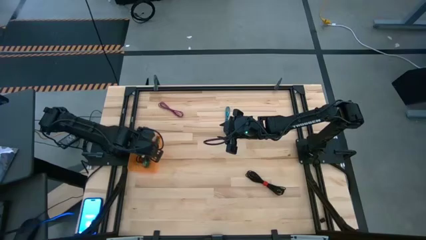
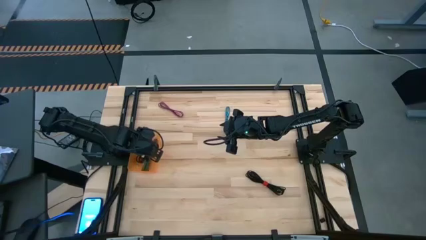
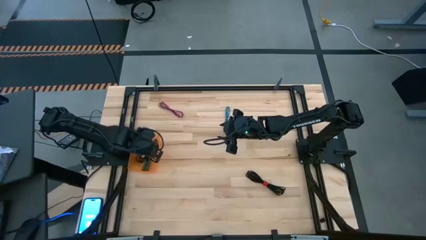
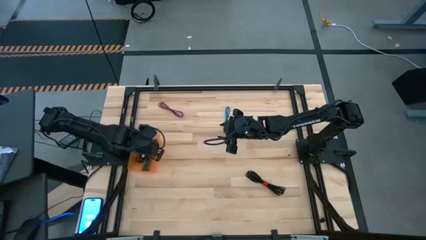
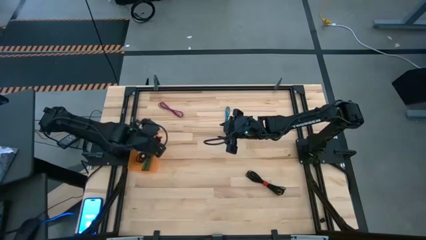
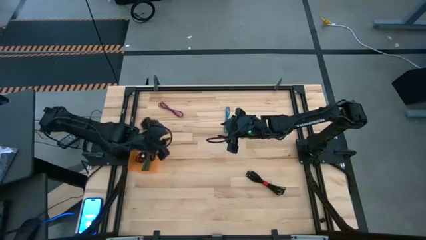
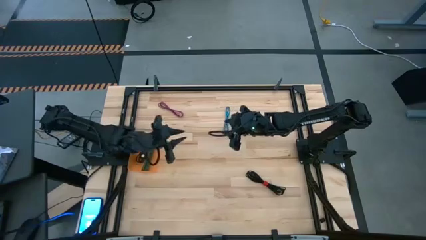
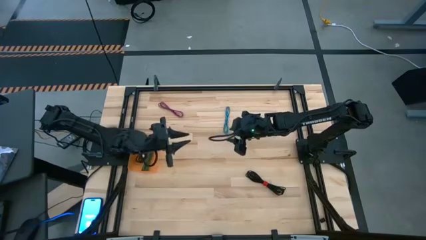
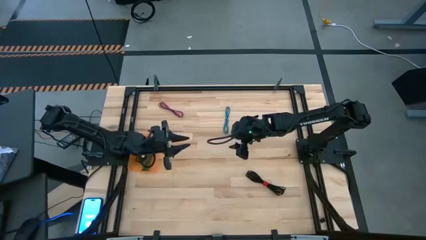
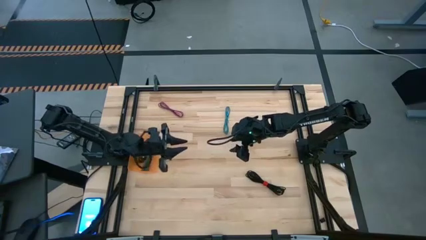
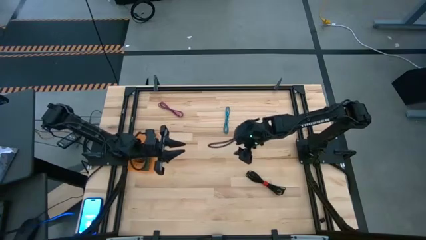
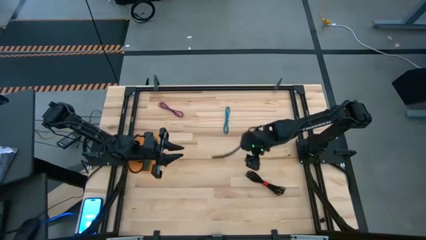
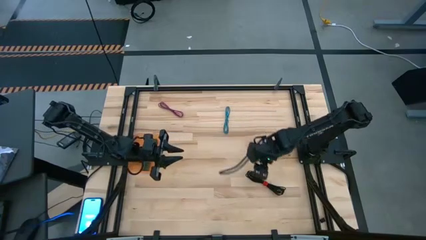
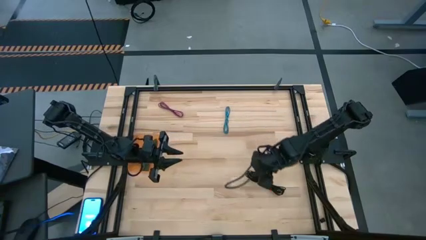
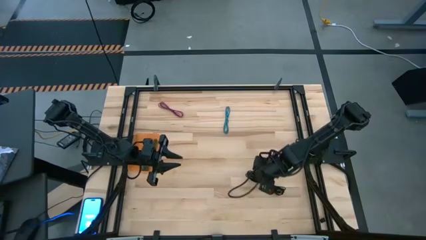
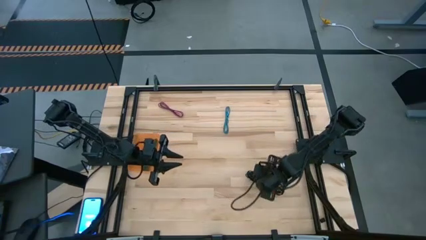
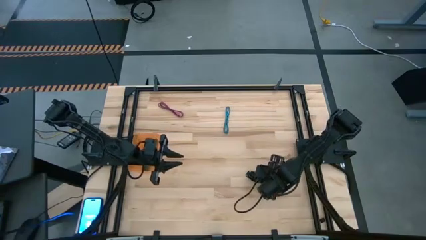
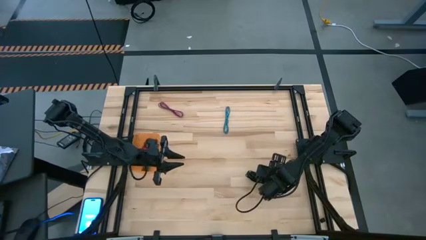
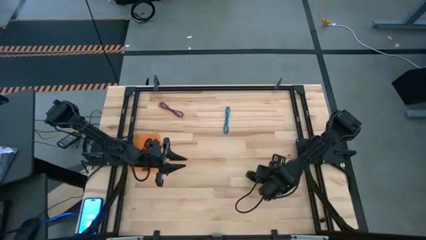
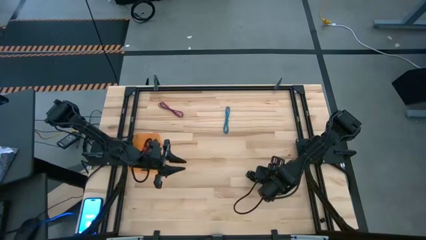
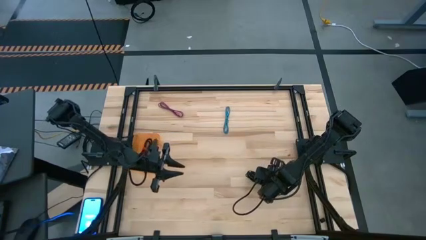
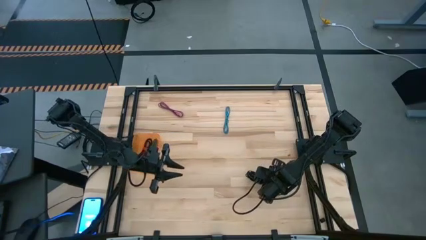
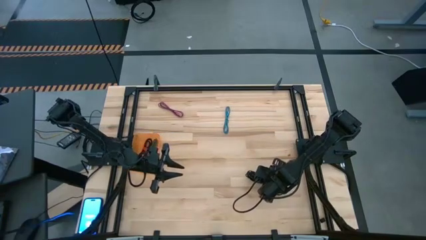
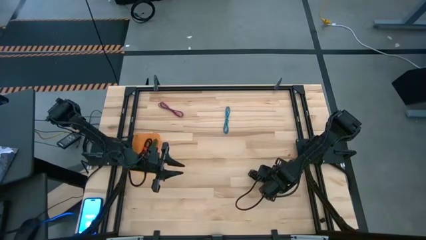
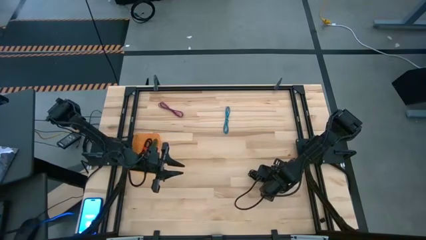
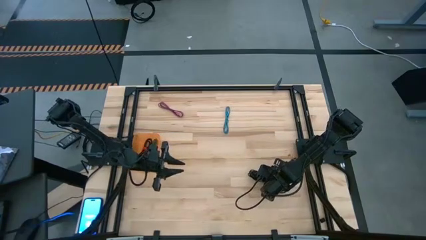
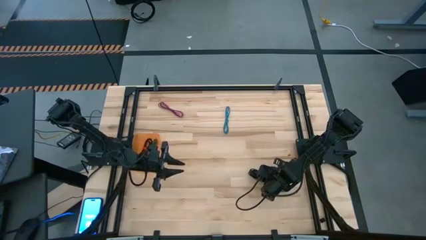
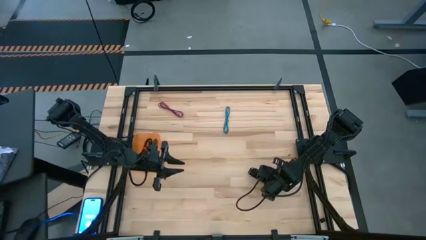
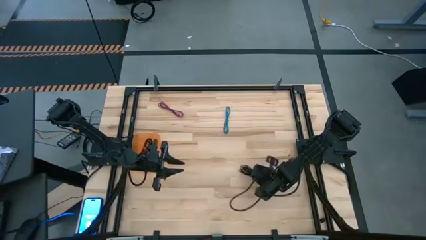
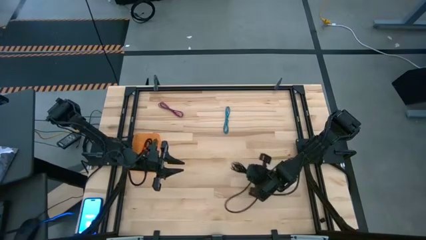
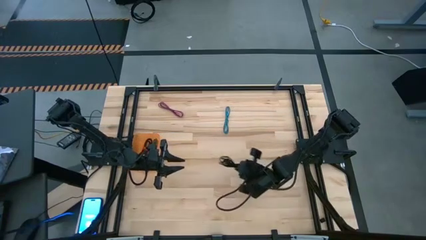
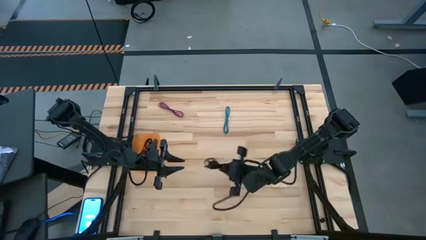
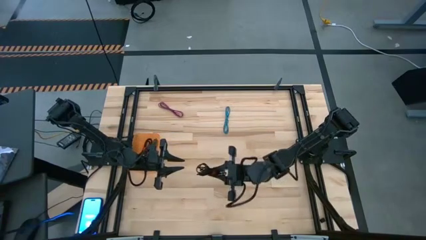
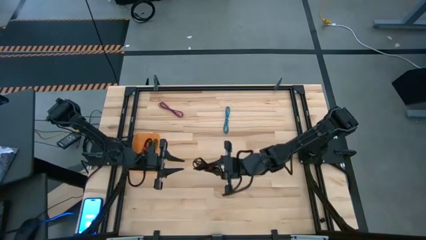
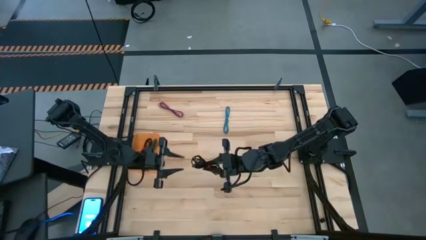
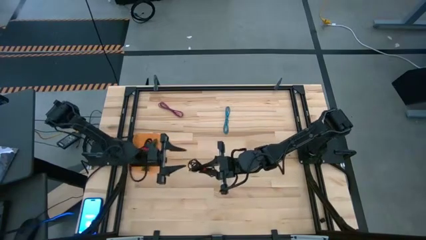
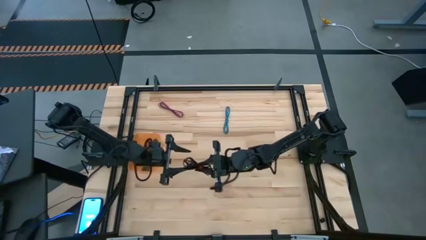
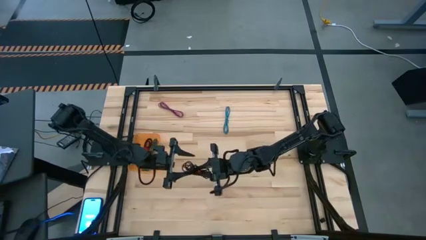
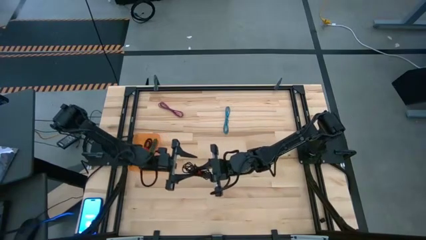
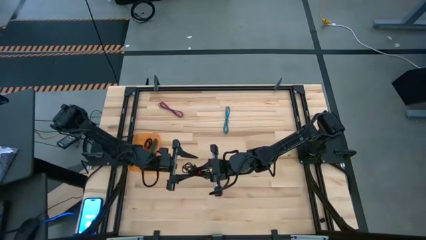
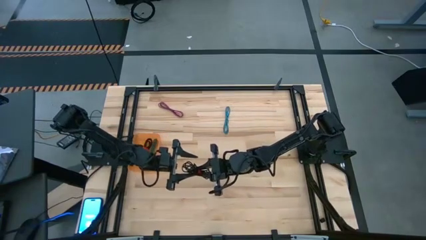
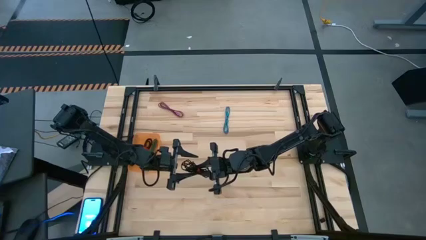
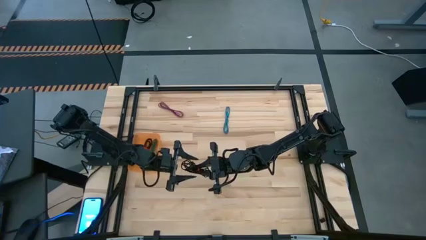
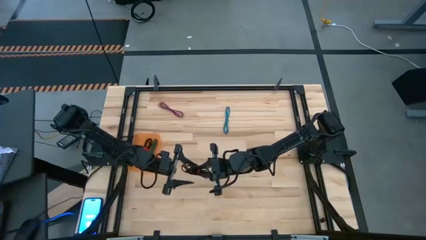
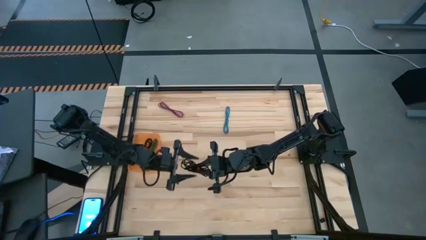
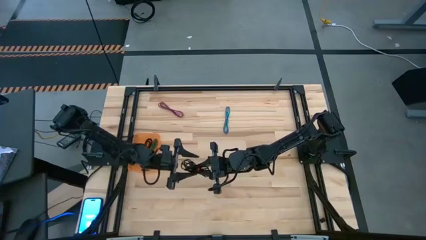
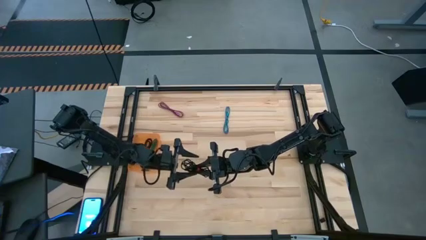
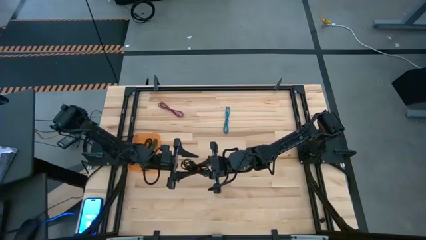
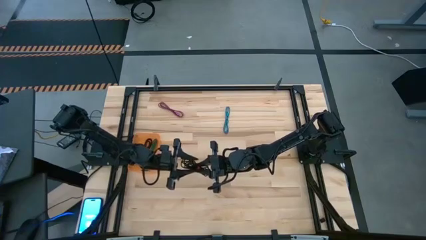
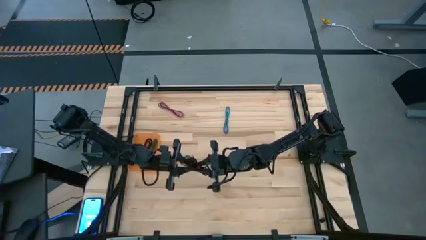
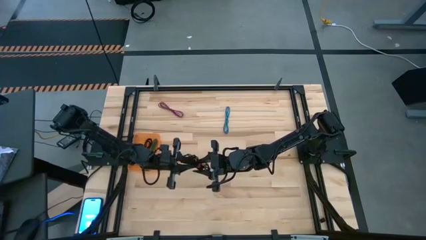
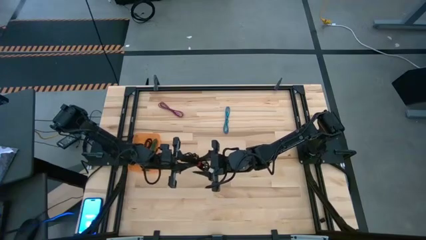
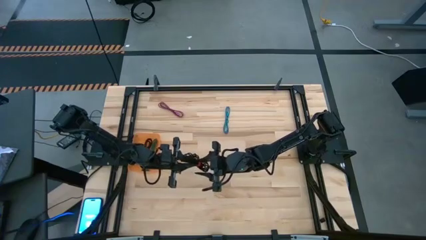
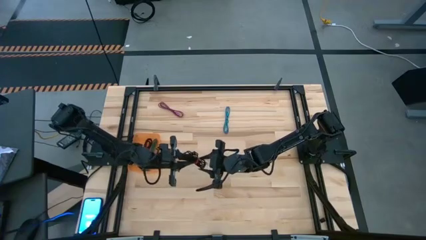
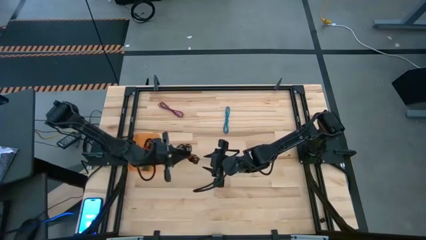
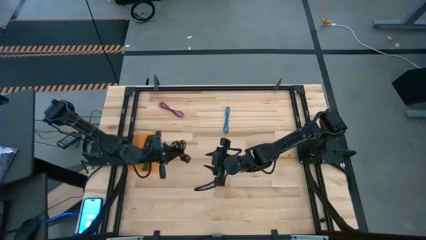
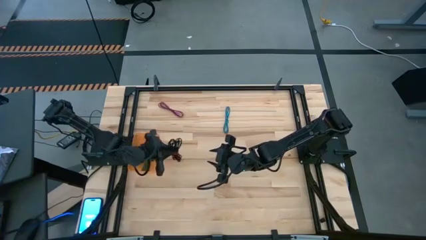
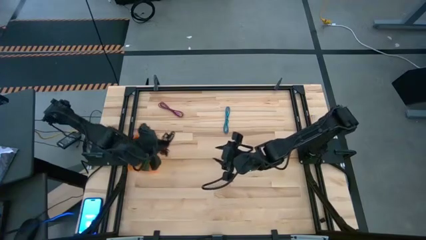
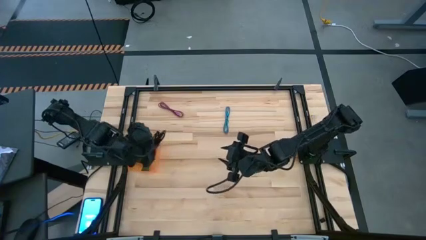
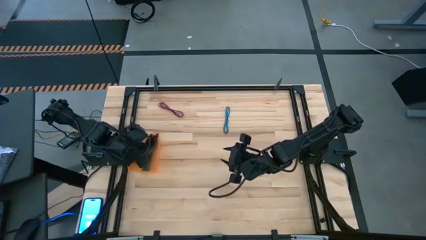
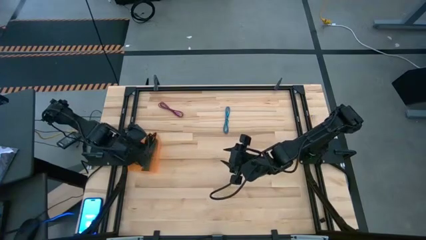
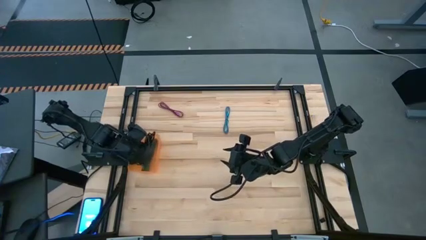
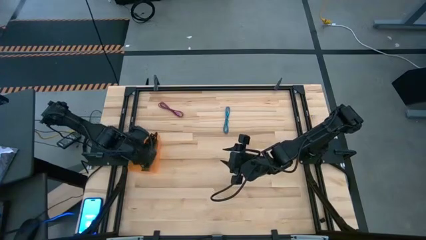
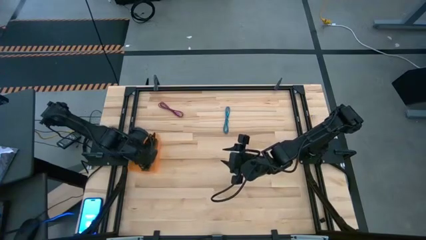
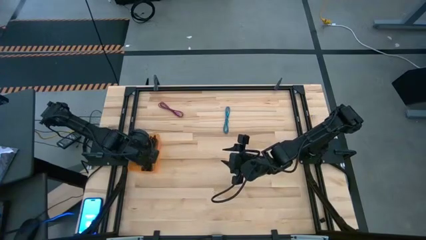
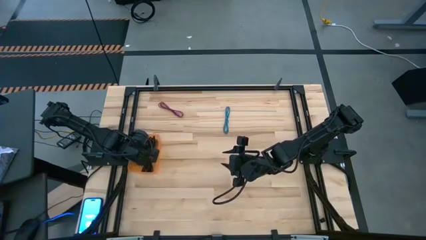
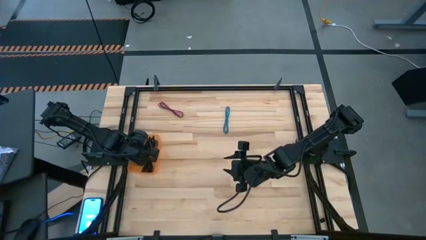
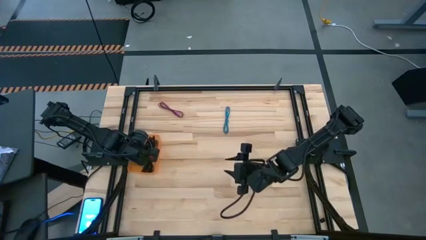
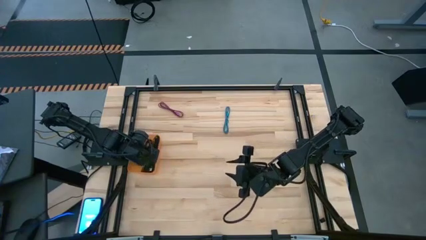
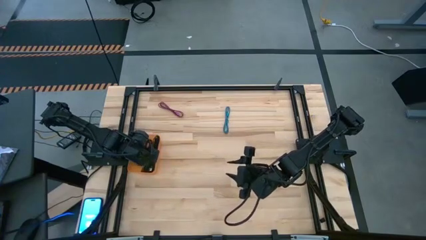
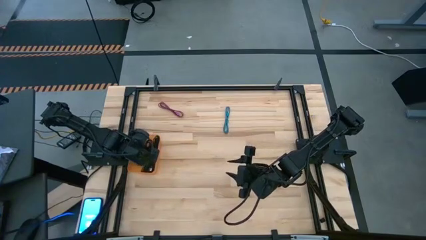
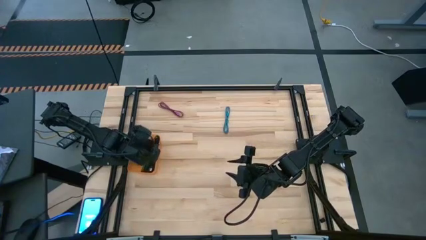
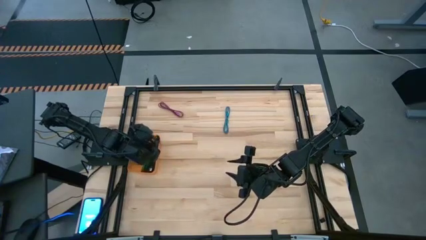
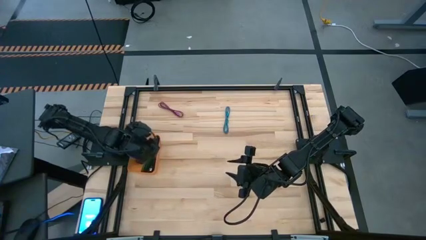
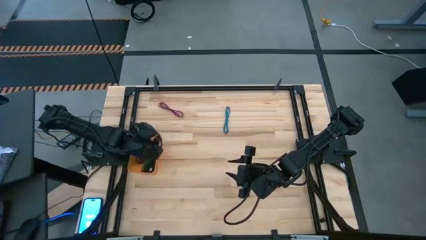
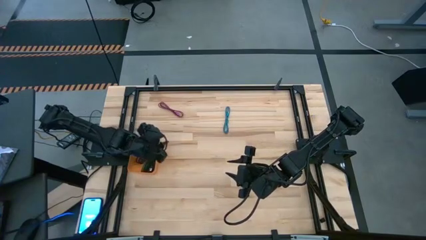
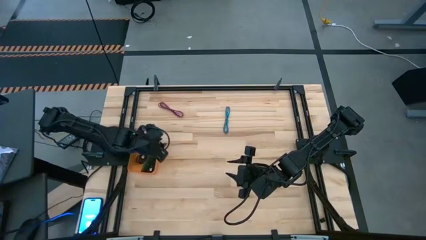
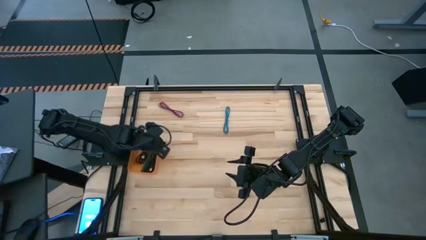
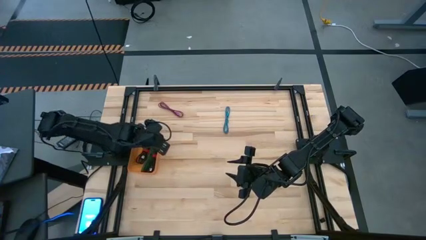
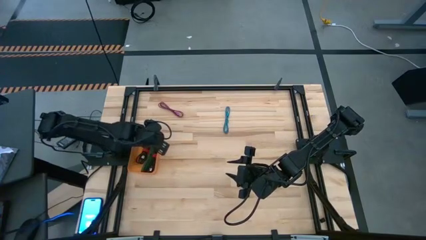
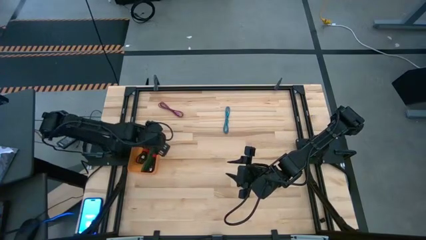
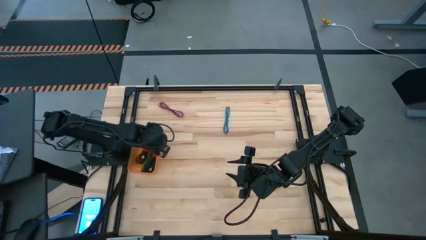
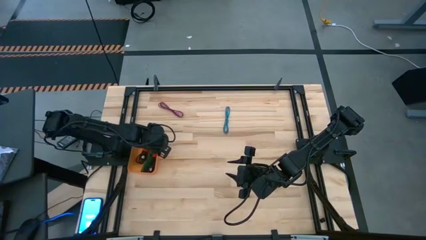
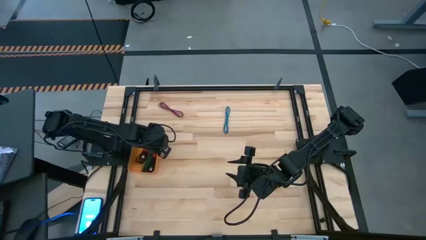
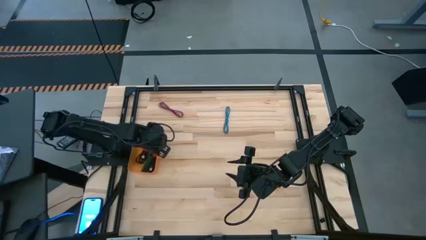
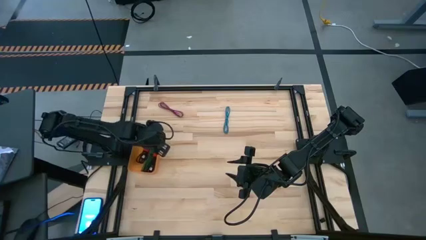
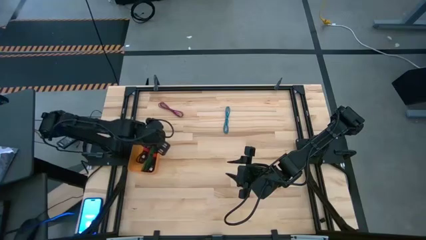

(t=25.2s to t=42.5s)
Task: Pick and place USB-C Cables
Put the black USB cable into the orange bin
